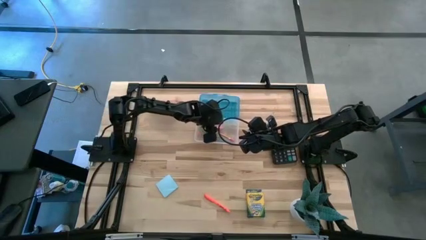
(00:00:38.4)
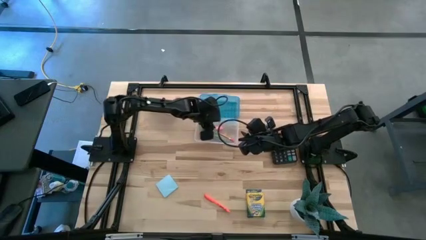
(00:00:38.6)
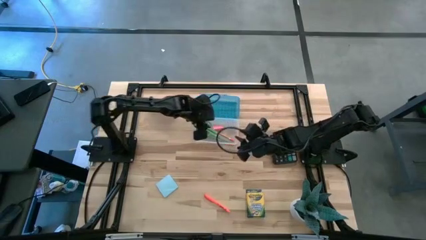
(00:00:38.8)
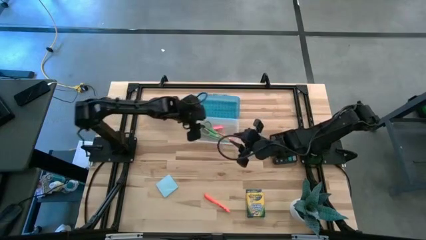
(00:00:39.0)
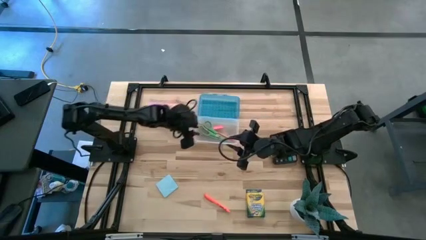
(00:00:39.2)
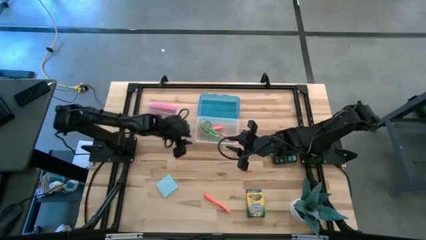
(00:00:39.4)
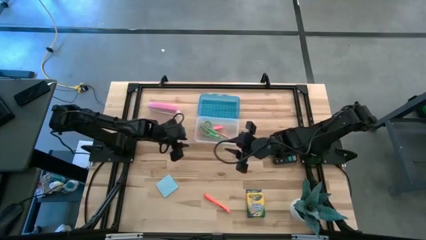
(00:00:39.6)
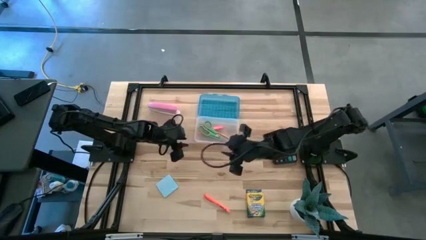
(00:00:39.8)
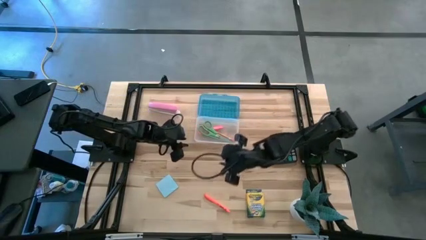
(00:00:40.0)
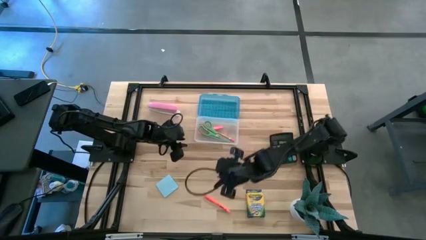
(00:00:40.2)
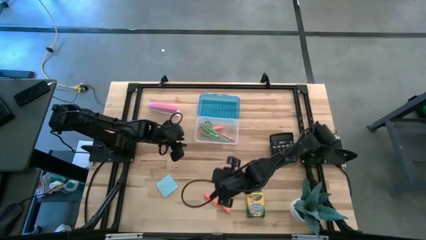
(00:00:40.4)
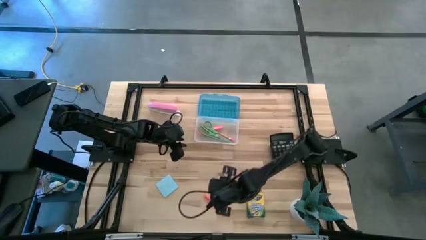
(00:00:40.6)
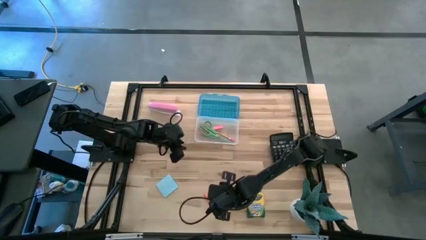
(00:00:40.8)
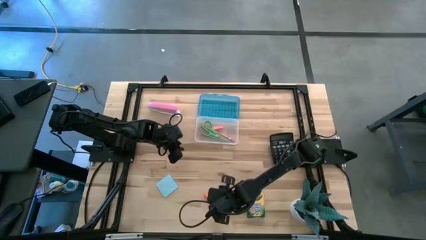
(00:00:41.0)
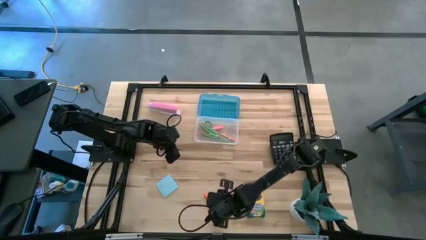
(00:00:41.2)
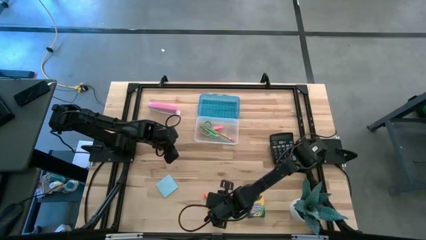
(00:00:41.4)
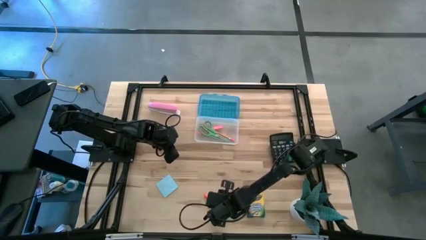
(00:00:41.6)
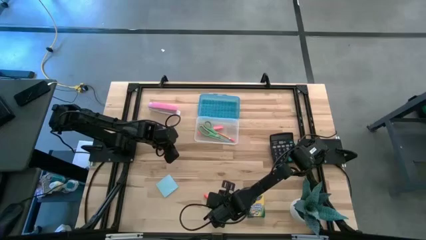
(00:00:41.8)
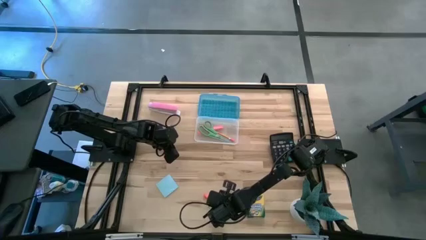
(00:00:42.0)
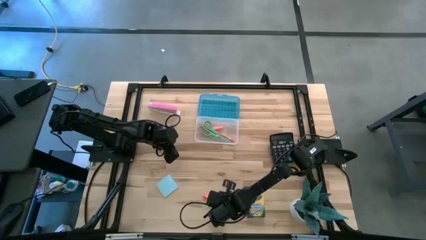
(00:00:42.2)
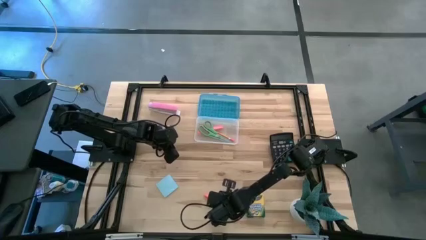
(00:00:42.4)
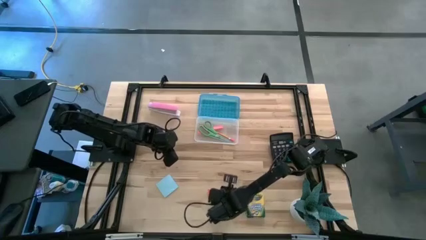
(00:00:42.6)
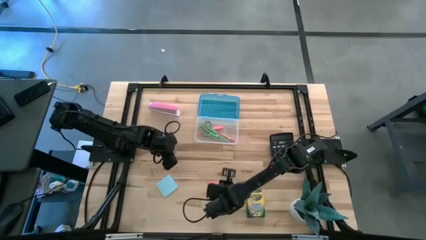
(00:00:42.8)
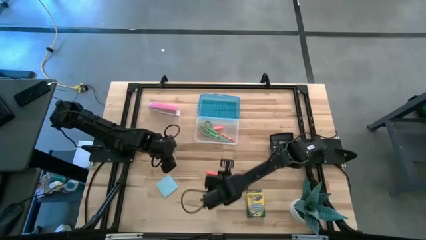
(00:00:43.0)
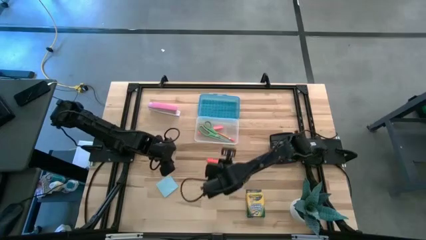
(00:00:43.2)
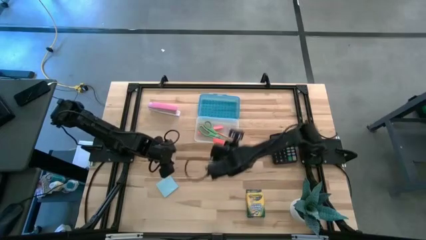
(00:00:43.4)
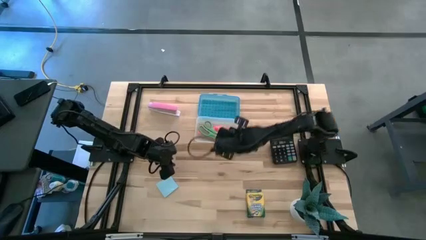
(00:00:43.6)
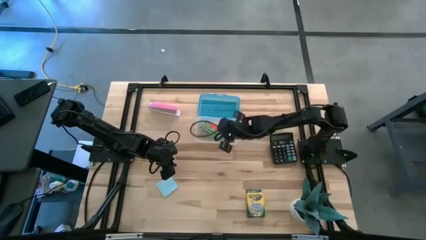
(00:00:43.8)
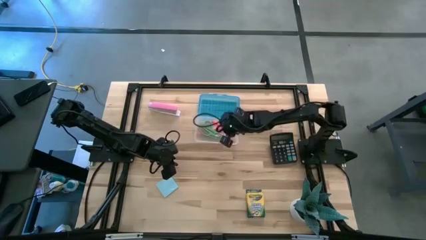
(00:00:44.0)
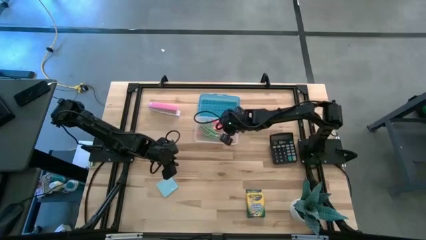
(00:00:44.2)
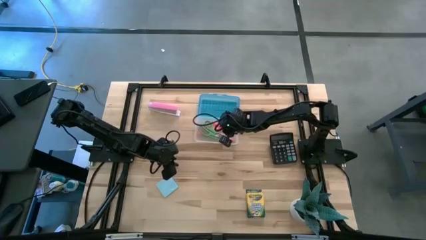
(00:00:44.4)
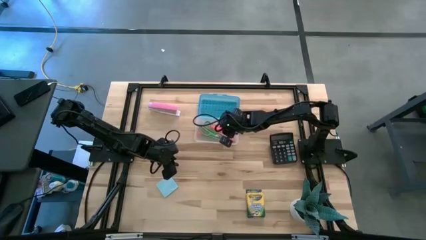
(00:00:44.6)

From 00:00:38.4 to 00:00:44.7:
Task: Pack school essentials
Put the orange pen into the blue supply box

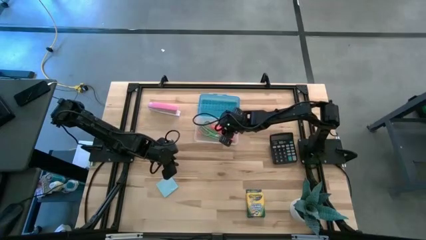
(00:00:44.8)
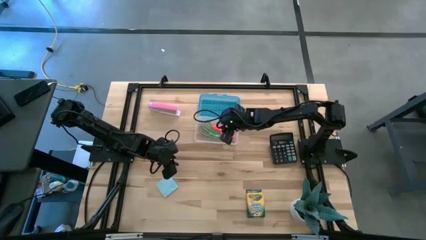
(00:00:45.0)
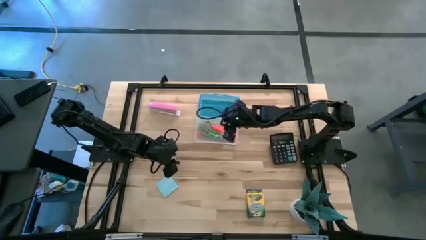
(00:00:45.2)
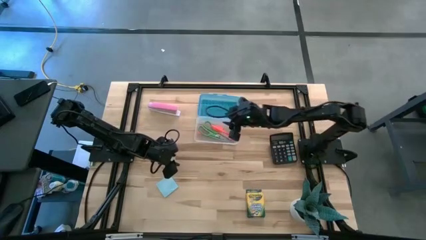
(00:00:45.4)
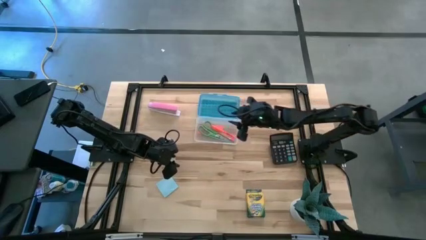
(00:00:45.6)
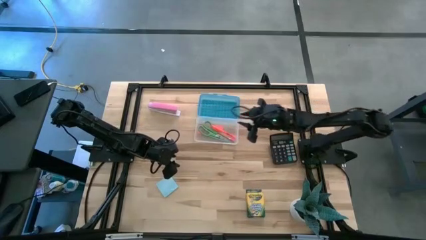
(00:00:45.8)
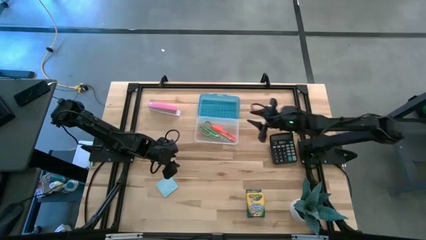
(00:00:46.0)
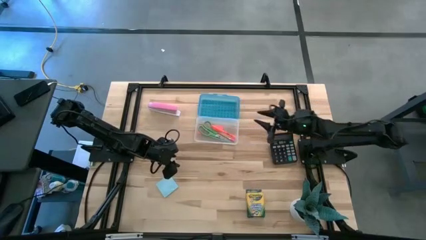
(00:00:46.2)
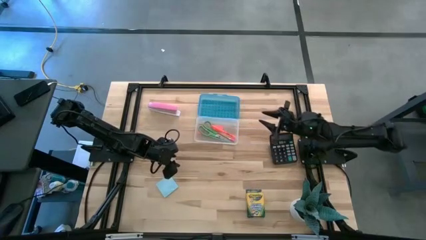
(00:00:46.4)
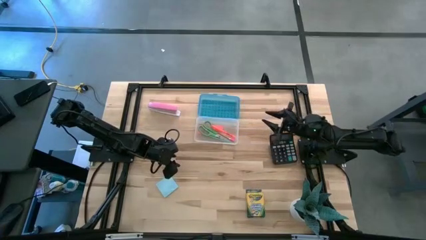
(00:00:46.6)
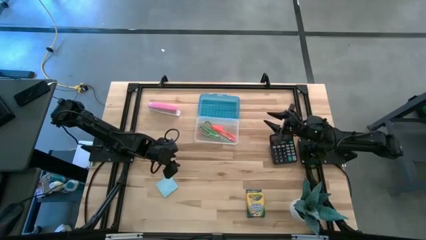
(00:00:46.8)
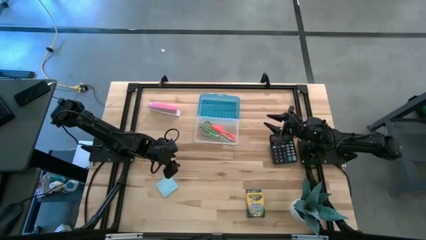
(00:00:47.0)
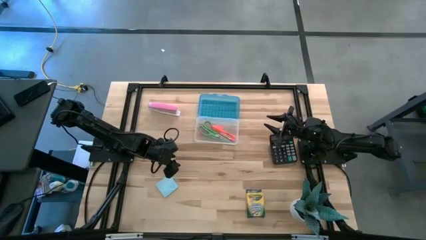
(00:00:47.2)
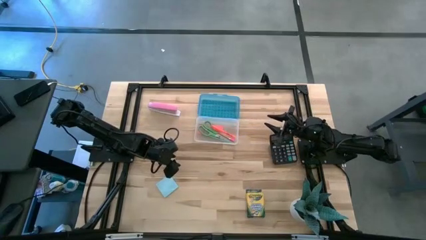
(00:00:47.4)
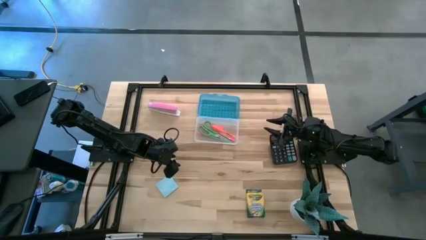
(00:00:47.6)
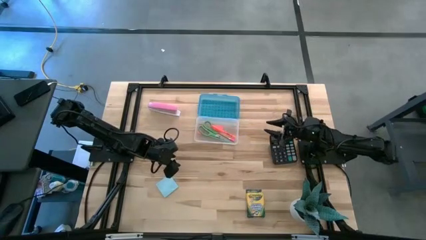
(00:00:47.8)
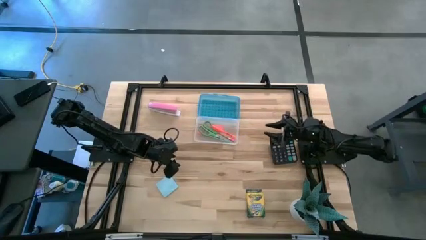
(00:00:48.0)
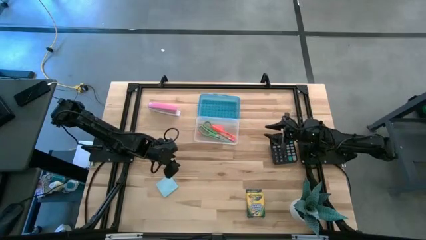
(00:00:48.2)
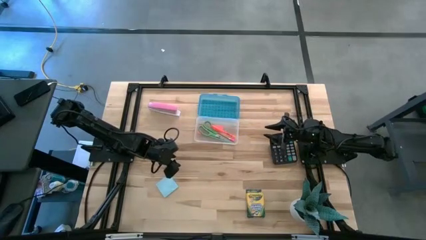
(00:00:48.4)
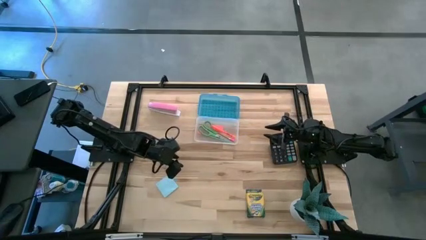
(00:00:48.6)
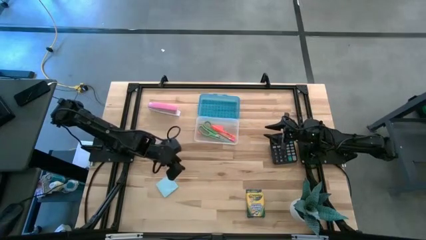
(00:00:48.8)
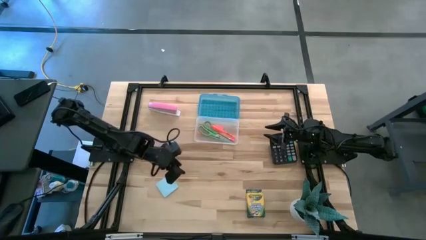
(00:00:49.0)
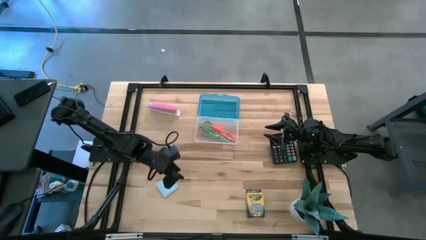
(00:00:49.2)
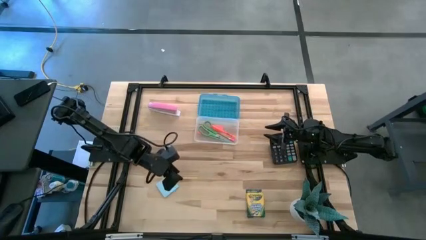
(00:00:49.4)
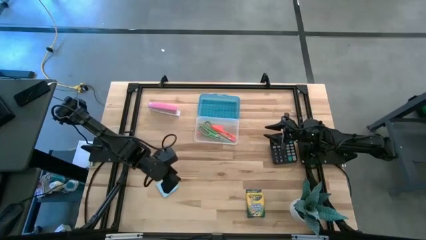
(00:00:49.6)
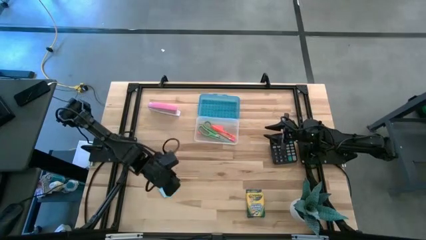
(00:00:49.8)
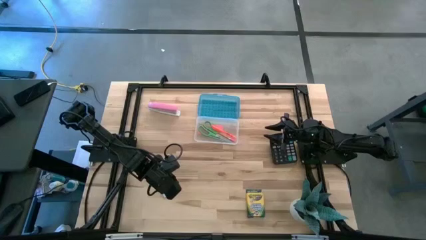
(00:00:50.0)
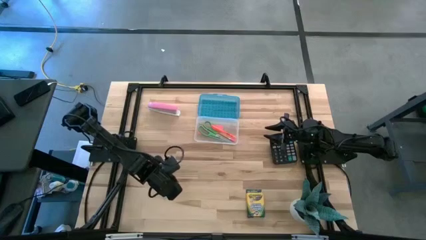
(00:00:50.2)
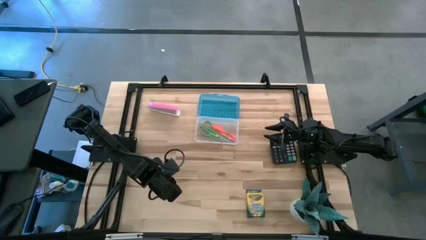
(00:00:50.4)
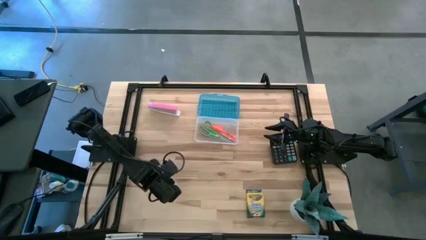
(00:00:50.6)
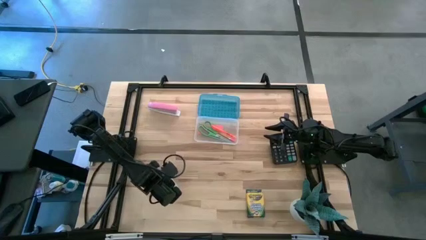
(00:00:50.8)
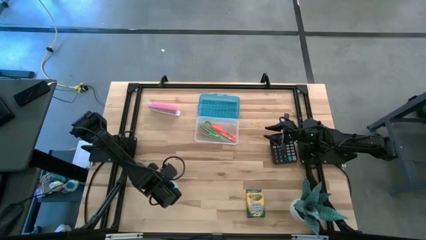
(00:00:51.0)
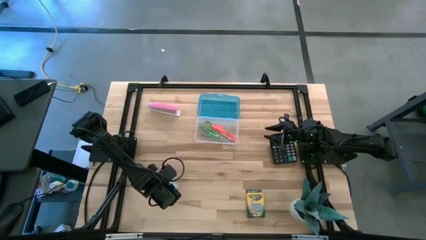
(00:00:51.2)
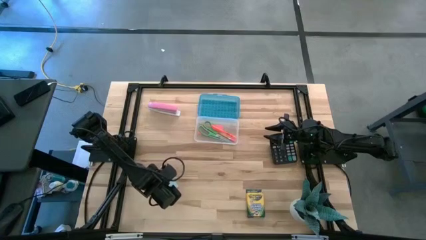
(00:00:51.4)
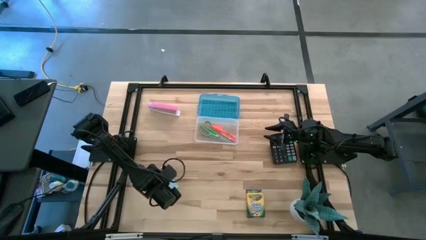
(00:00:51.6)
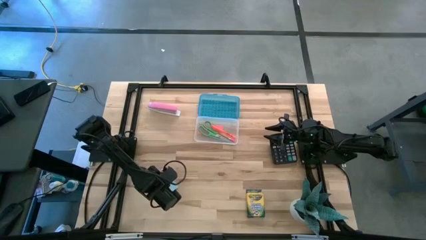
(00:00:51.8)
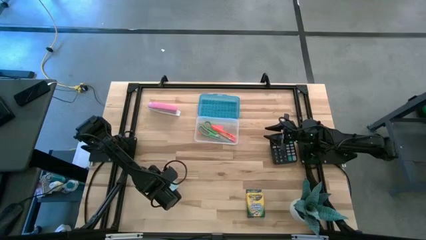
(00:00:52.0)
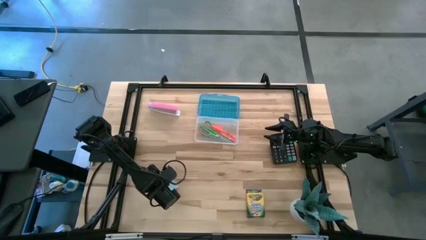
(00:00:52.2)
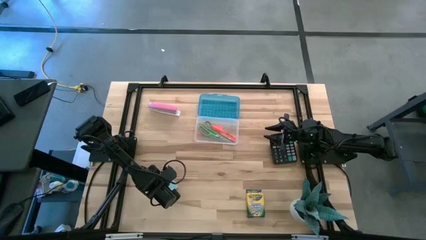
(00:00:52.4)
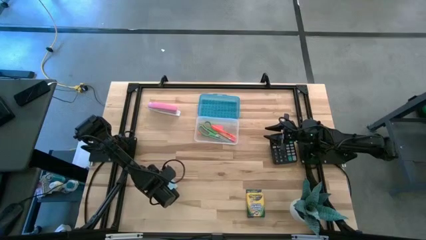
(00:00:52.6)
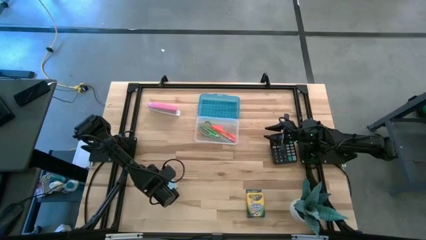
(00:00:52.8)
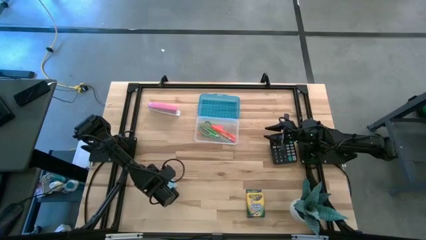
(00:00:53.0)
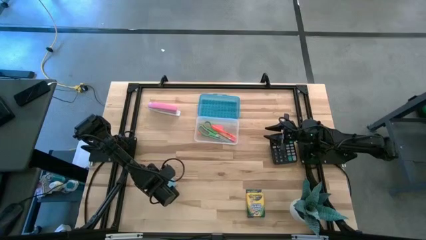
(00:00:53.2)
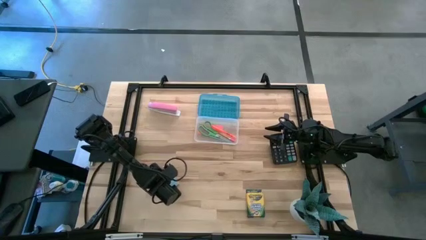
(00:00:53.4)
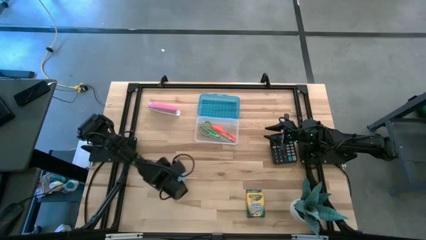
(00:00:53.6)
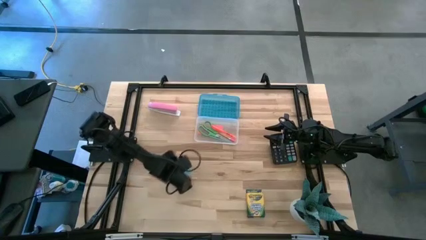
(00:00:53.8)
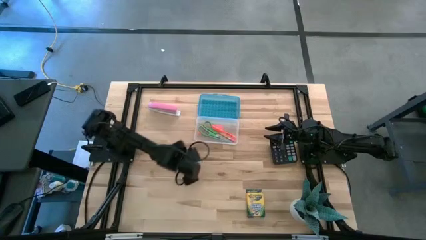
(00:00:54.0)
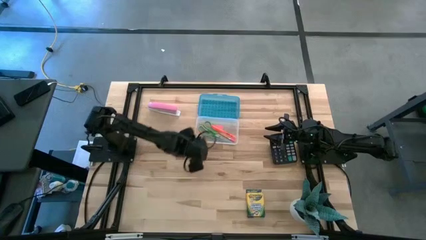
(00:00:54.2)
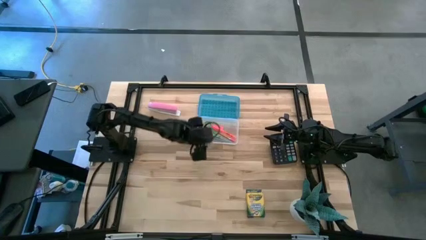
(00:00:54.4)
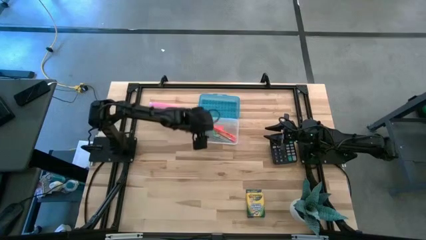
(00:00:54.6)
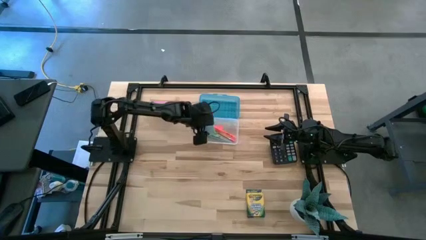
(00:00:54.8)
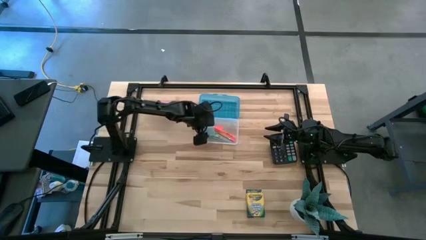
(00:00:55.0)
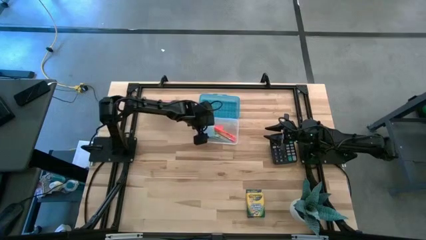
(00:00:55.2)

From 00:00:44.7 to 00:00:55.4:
Put the blue sticky note into the blue supply box
